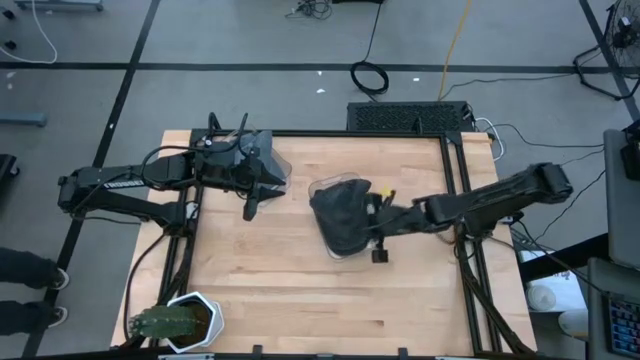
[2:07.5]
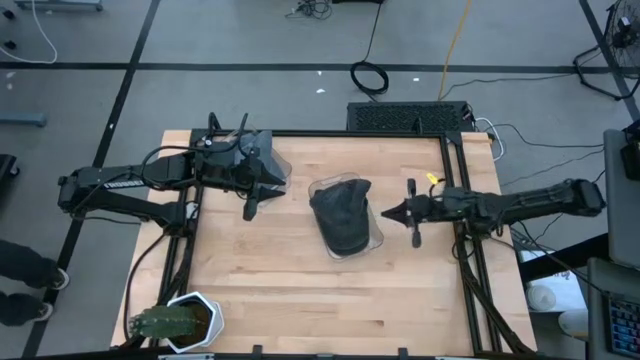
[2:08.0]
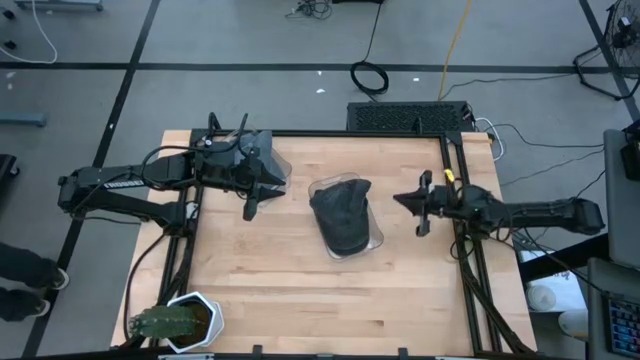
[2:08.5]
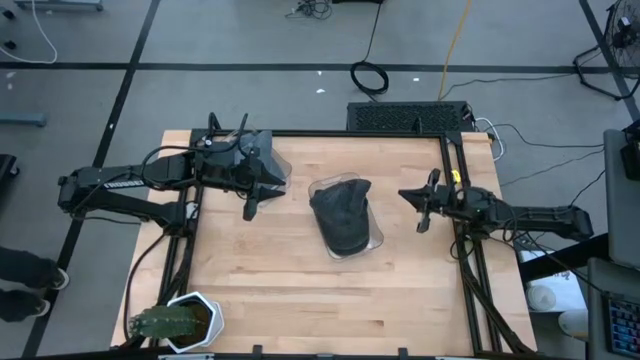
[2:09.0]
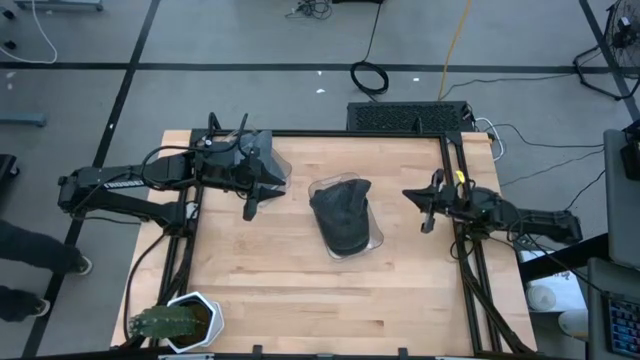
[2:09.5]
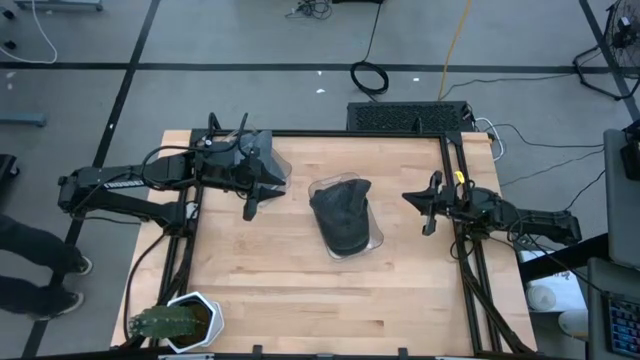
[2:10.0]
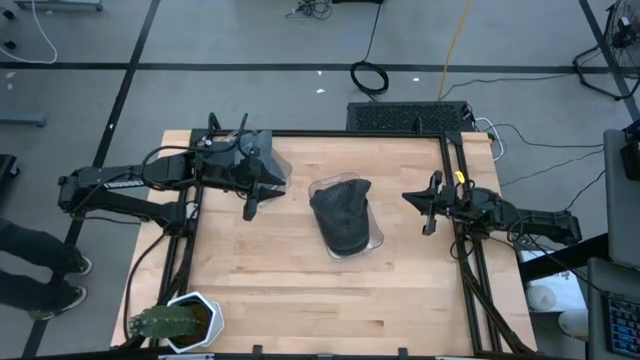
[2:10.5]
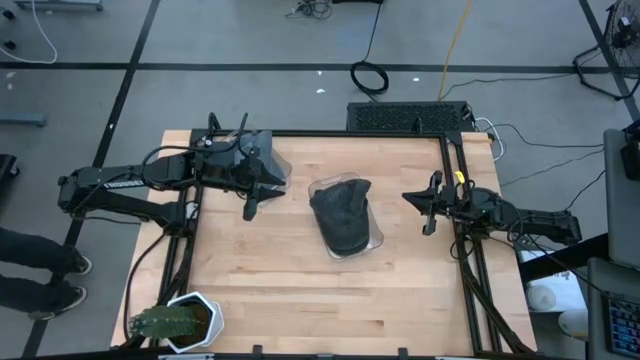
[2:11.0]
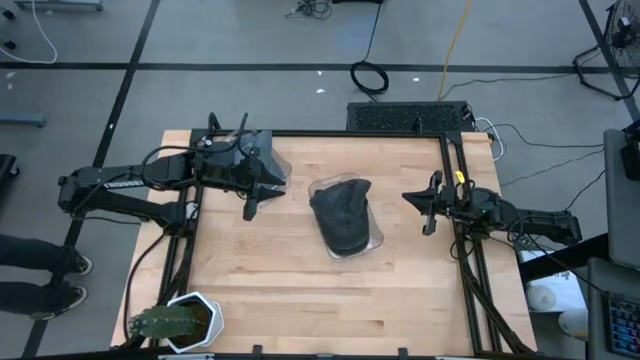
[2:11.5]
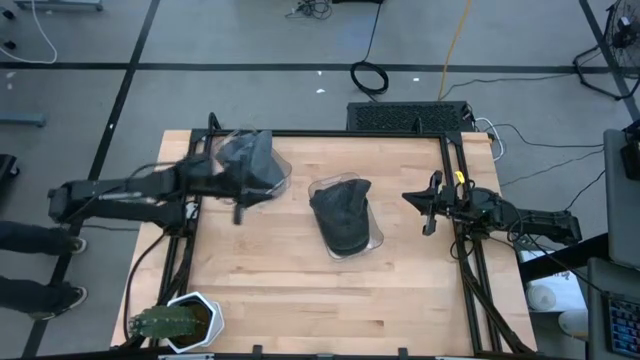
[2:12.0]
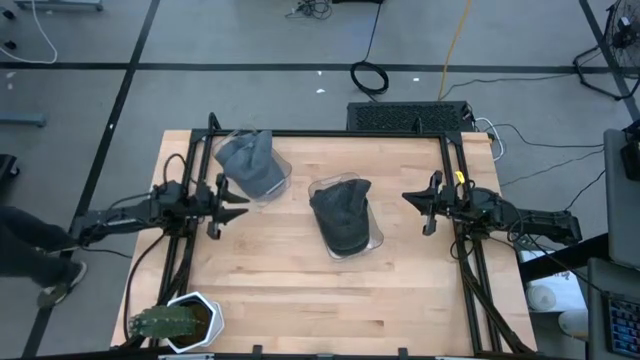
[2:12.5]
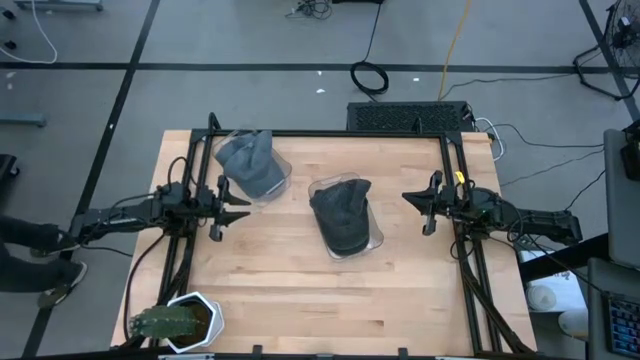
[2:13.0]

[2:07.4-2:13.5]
Task: Pick & Place hat
Return to Home Position

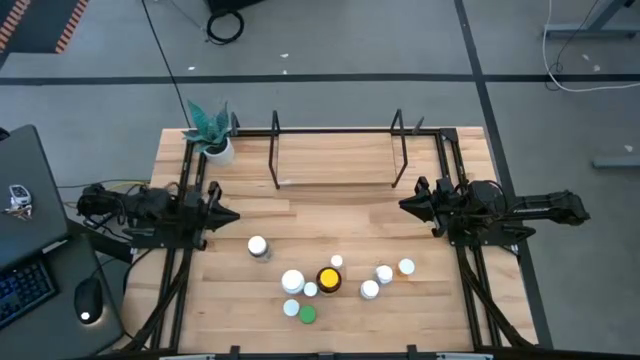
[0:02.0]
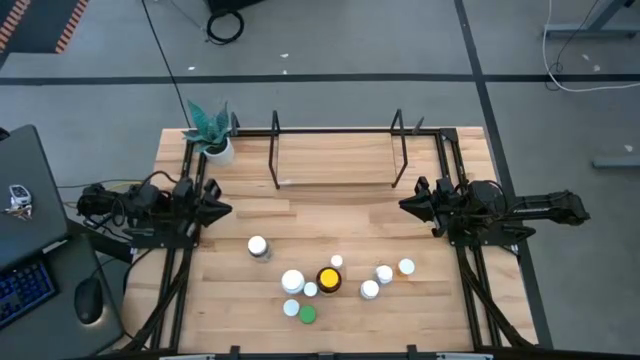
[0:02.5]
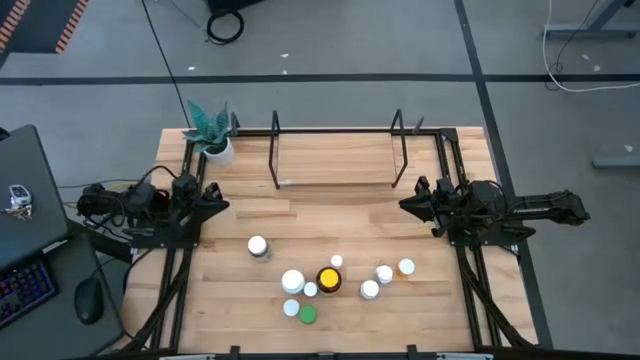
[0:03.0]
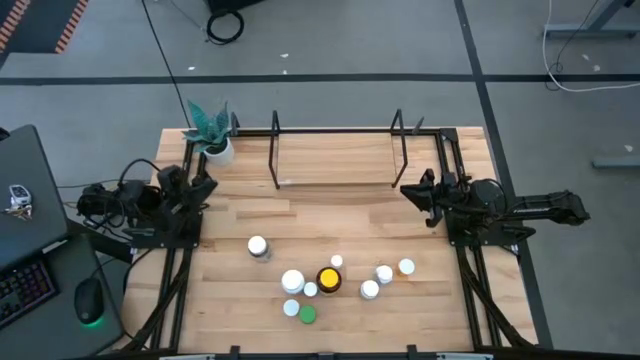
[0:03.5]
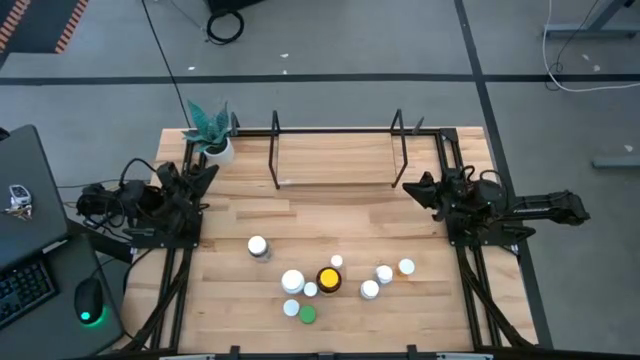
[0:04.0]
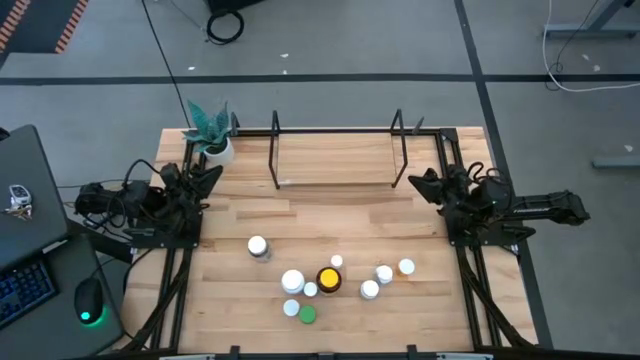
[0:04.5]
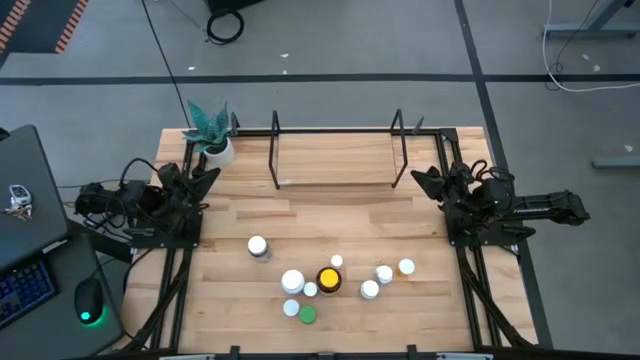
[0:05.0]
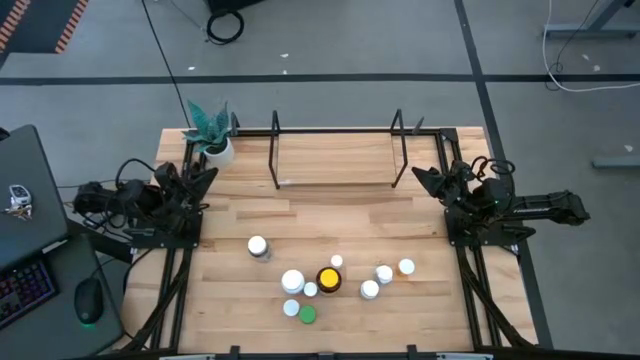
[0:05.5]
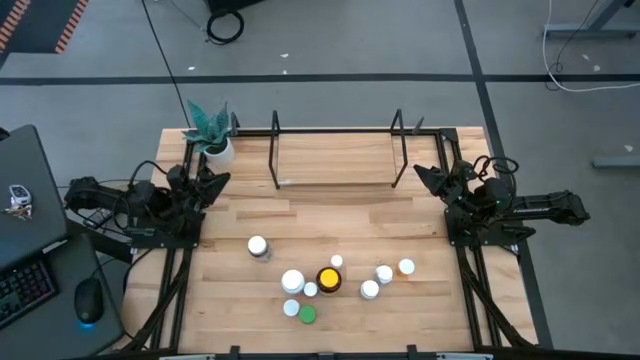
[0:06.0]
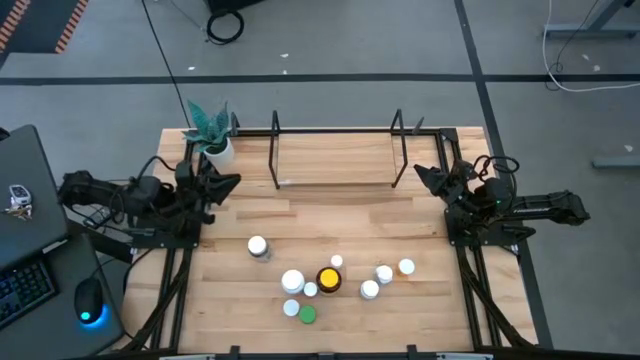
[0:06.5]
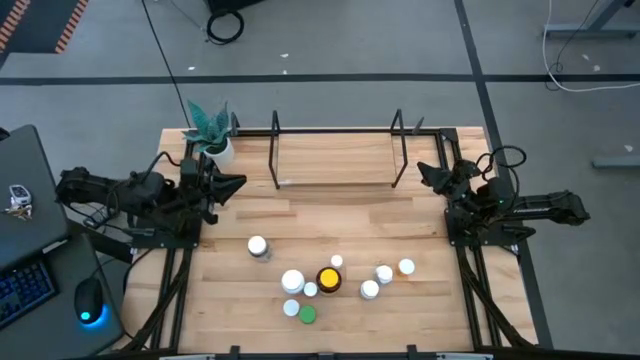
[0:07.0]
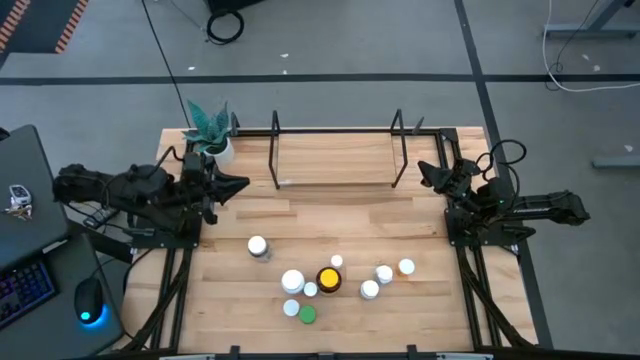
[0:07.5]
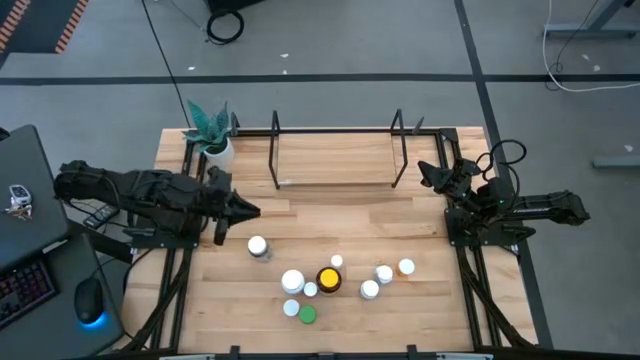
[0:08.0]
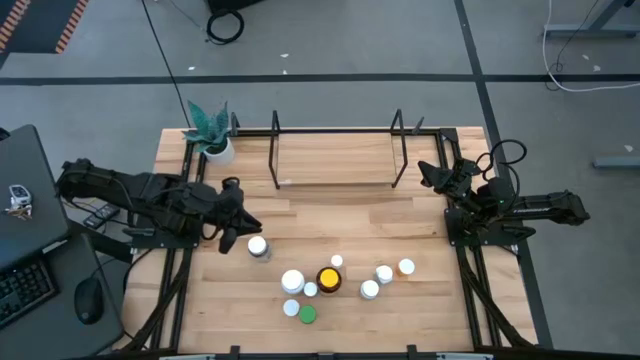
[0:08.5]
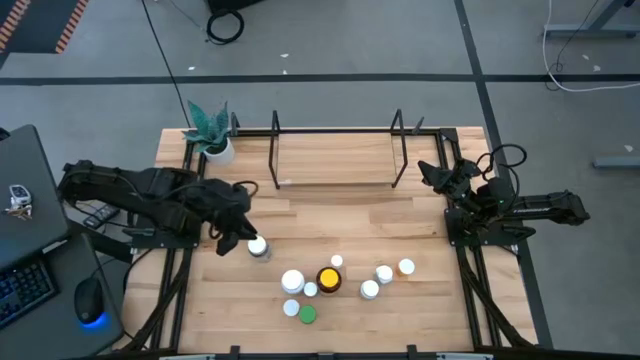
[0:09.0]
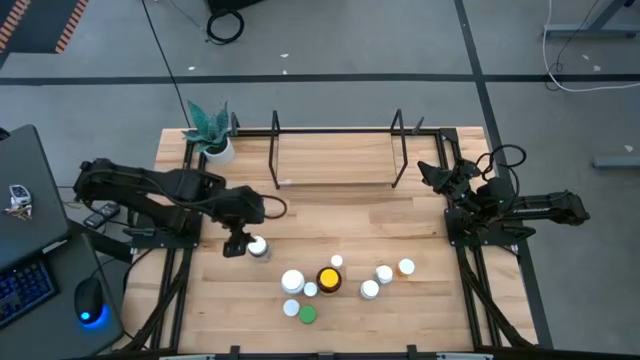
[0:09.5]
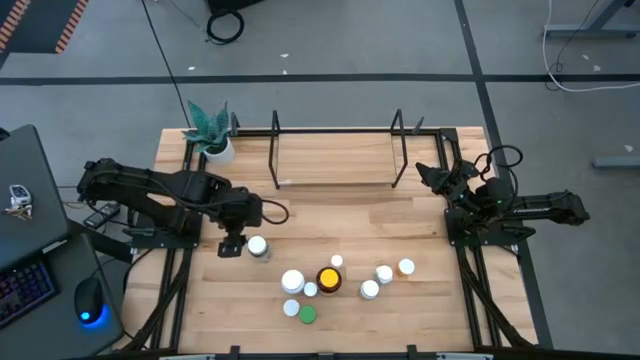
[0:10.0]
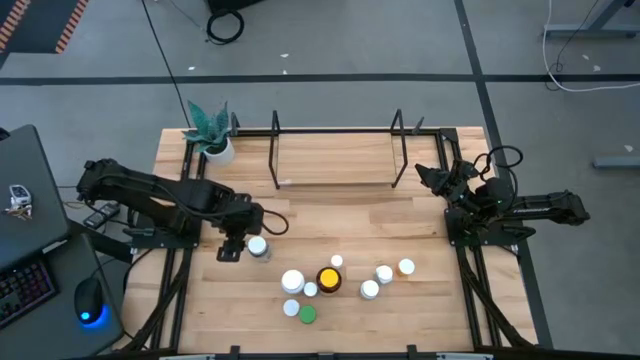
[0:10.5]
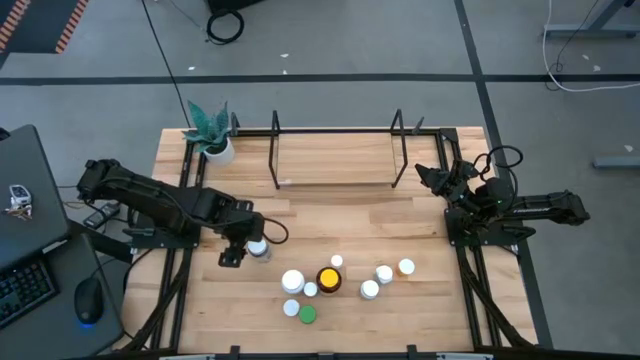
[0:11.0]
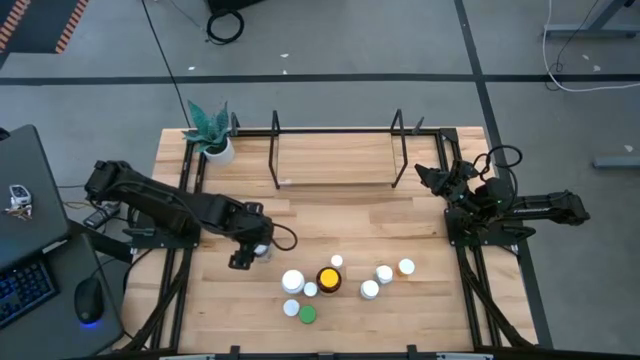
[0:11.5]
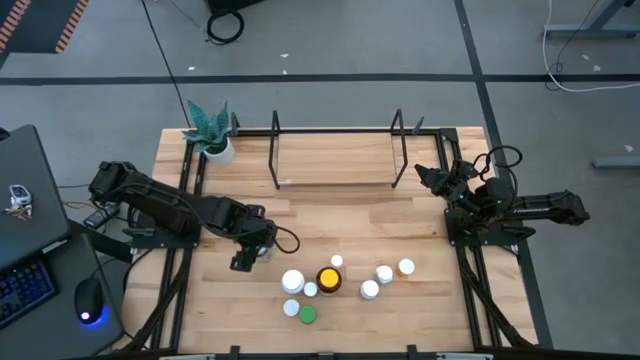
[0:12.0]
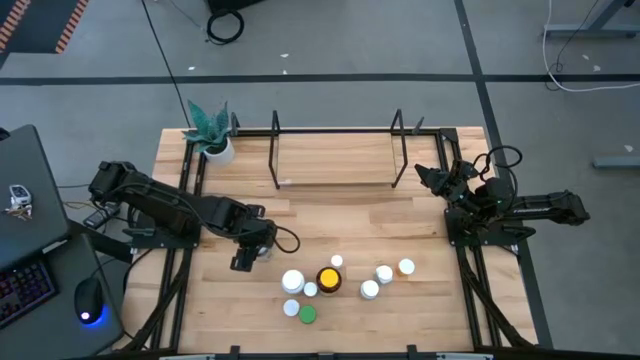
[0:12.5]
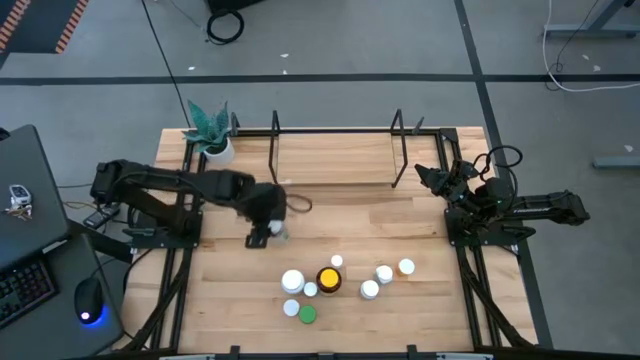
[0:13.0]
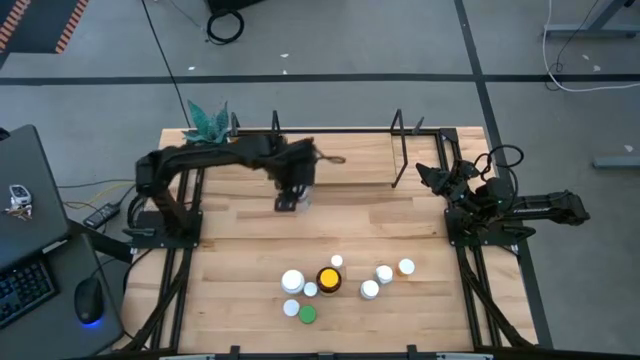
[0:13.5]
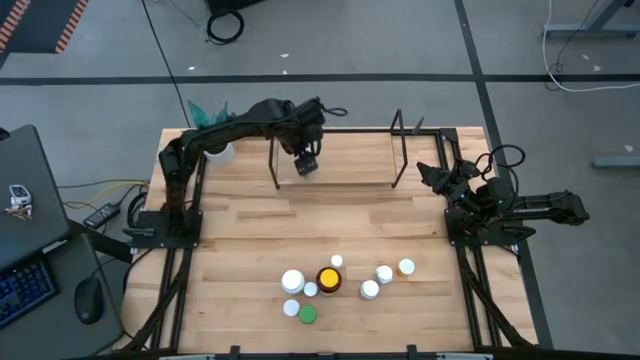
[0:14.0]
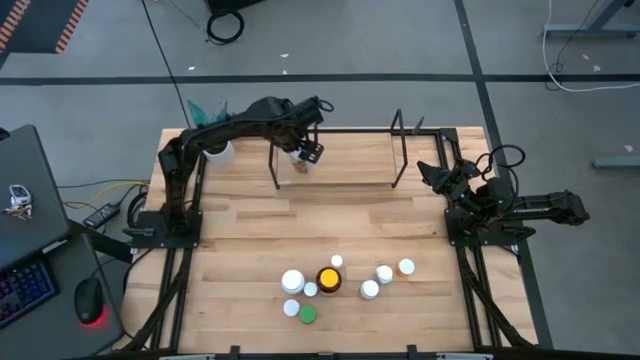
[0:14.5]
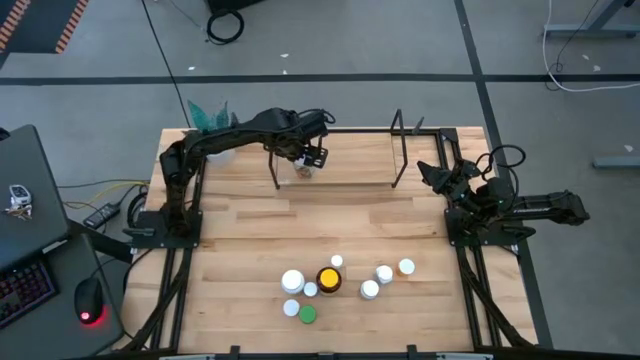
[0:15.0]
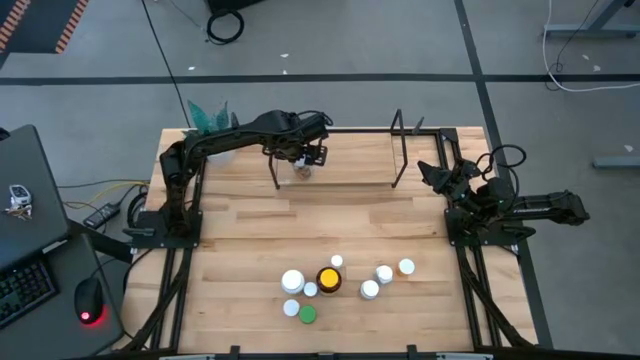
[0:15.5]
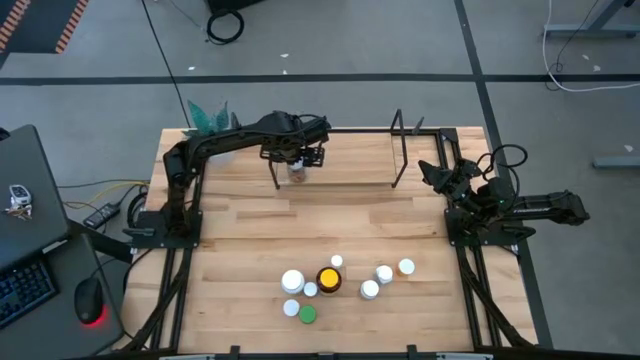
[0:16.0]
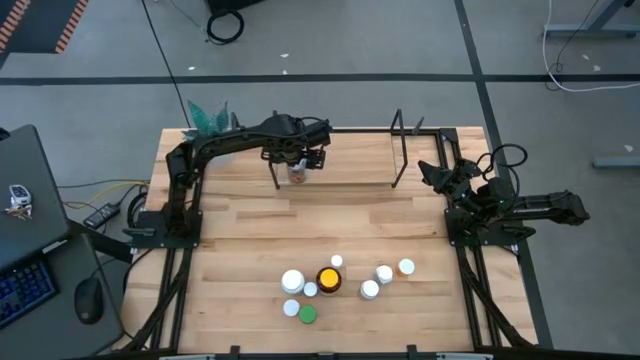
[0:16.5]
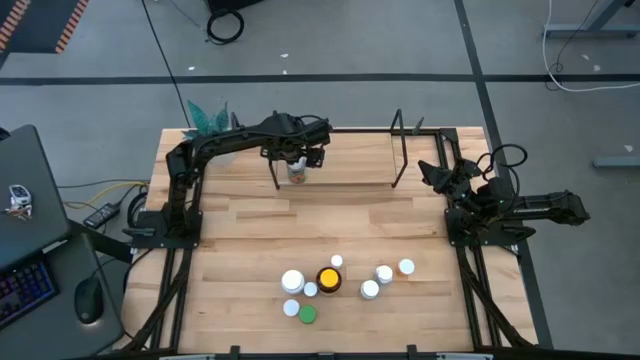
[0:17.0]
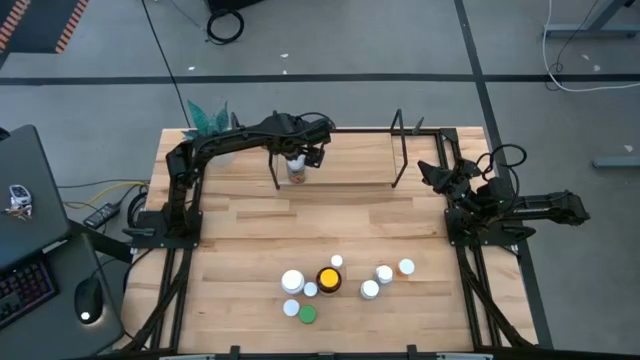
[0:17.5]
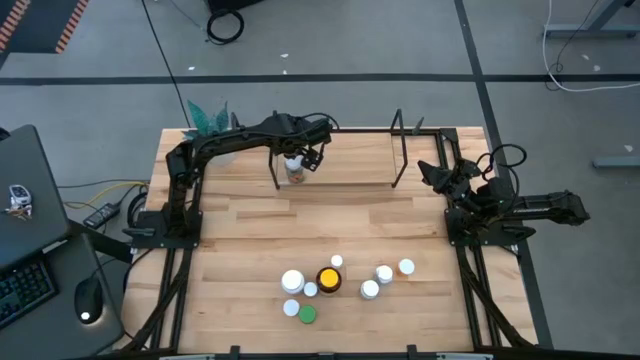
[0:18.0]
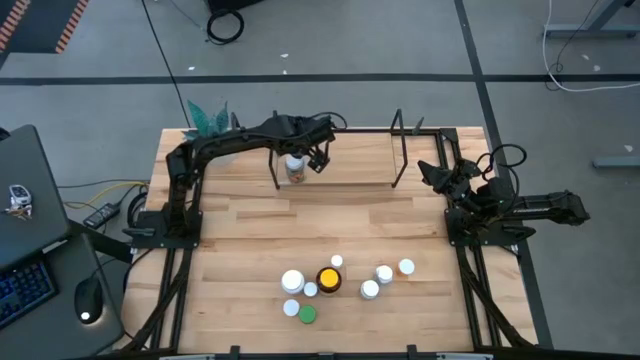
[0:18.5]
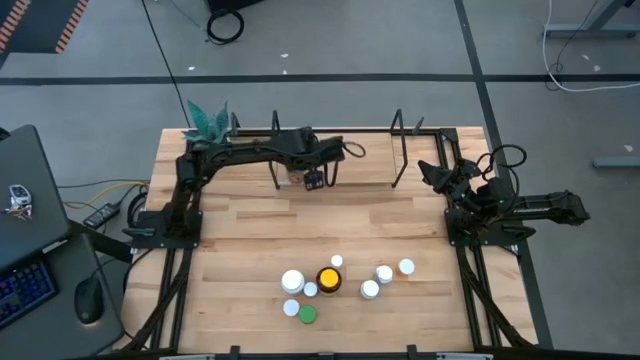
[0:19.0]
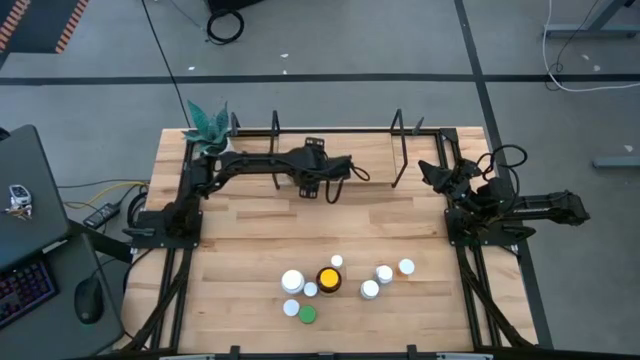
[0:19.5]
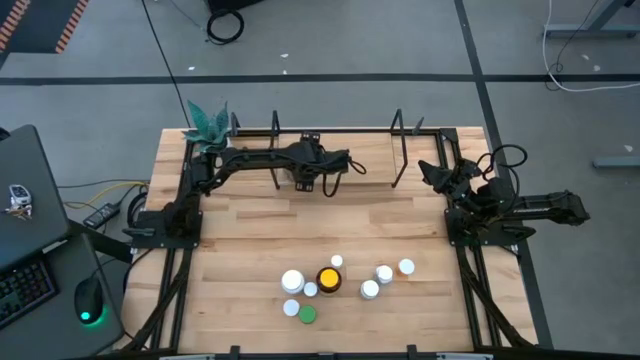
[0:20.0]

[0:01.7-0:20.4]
Task: Pick and place medicine bottles onto shelf by color
Put the large green pill bottle on the shelf
